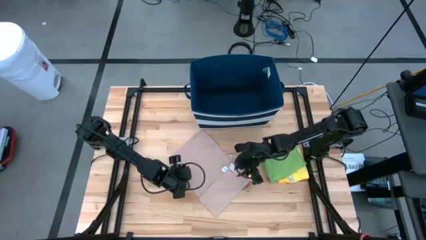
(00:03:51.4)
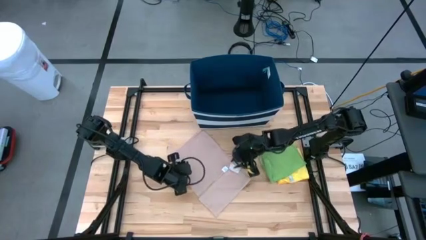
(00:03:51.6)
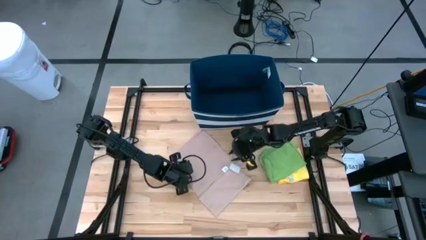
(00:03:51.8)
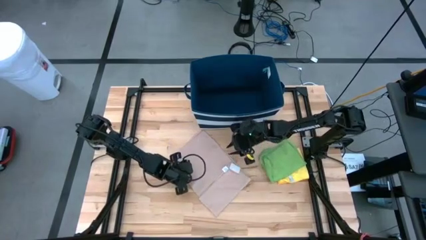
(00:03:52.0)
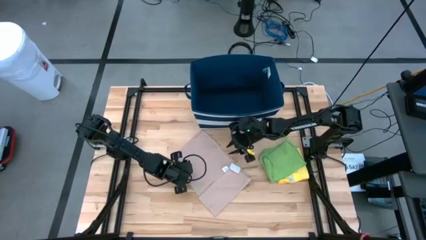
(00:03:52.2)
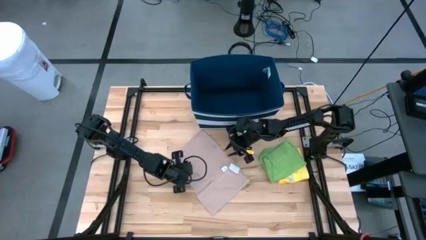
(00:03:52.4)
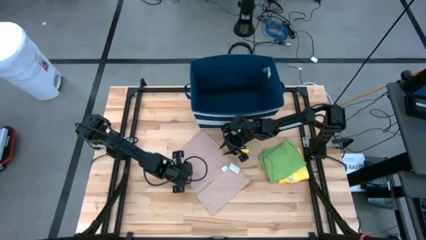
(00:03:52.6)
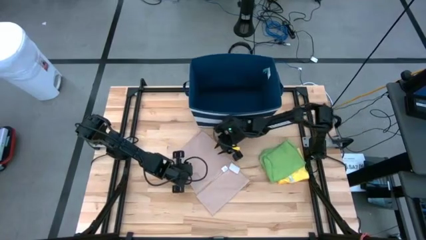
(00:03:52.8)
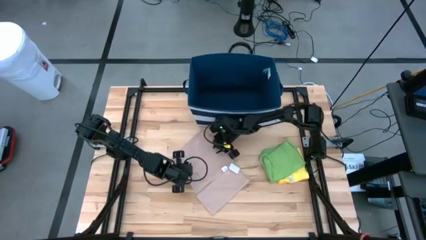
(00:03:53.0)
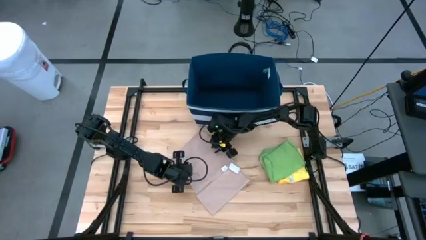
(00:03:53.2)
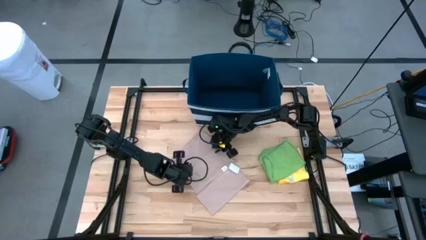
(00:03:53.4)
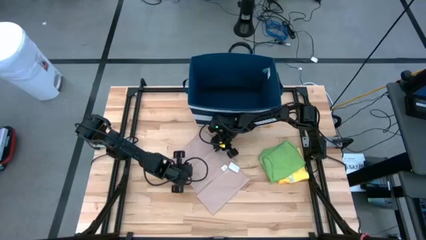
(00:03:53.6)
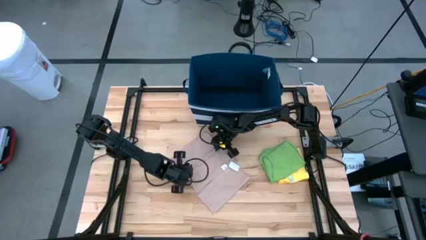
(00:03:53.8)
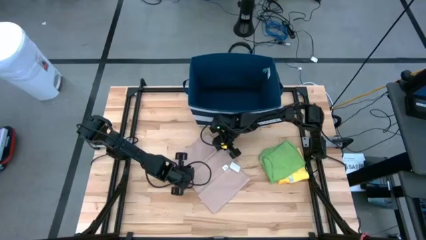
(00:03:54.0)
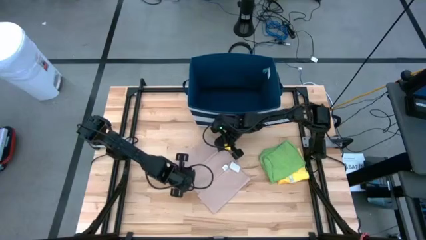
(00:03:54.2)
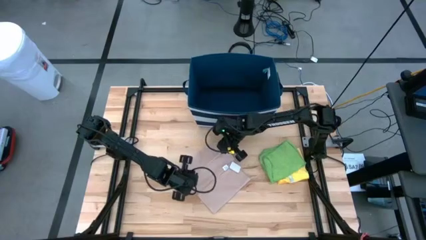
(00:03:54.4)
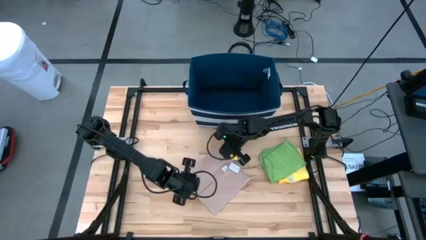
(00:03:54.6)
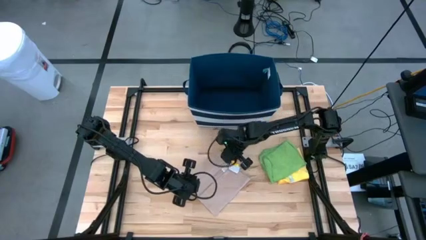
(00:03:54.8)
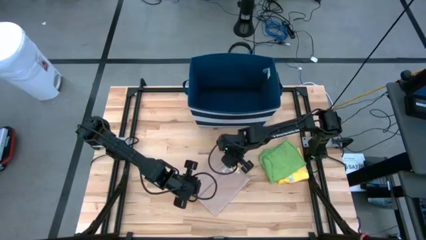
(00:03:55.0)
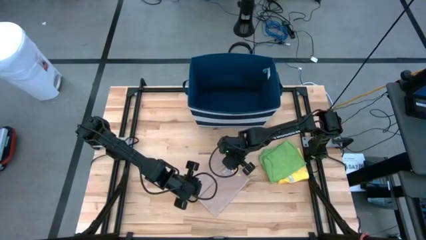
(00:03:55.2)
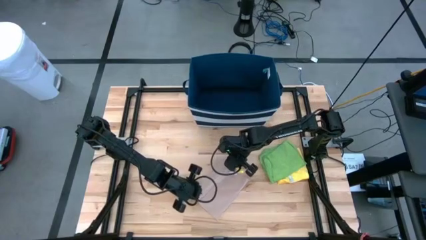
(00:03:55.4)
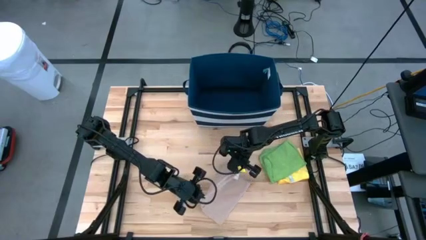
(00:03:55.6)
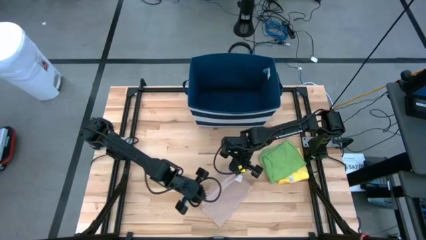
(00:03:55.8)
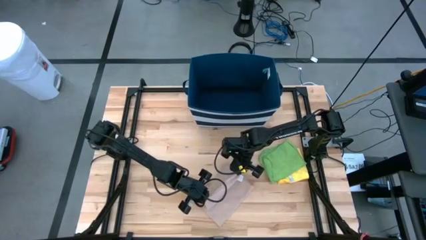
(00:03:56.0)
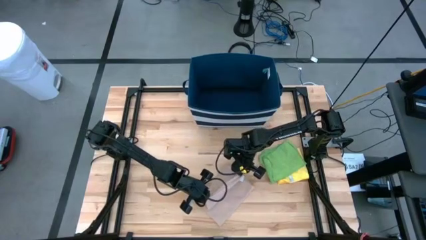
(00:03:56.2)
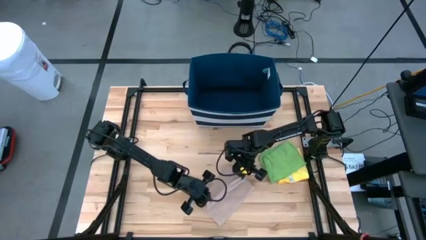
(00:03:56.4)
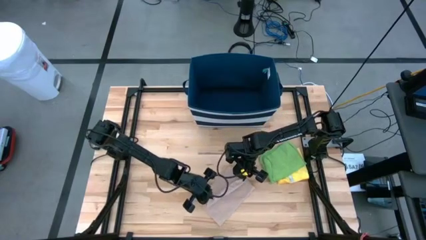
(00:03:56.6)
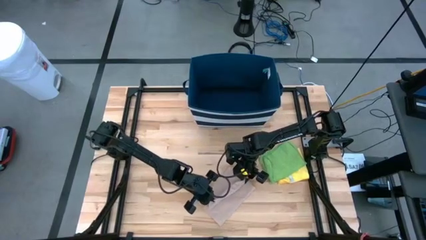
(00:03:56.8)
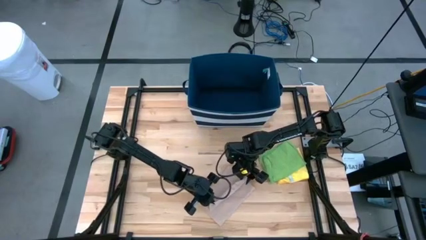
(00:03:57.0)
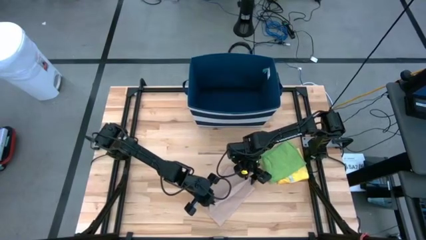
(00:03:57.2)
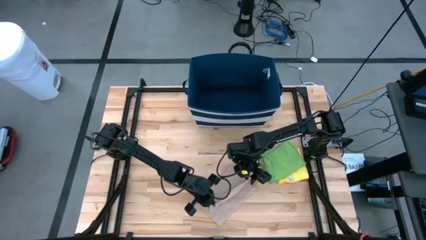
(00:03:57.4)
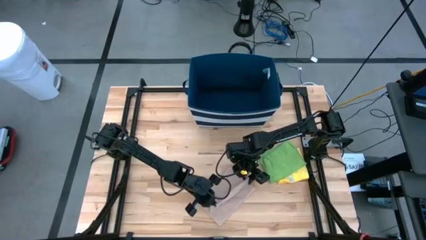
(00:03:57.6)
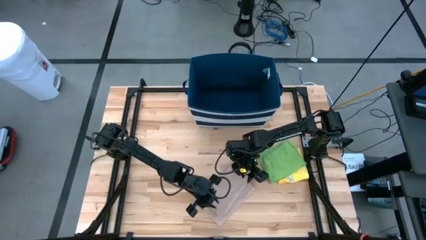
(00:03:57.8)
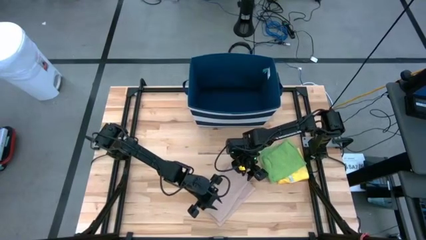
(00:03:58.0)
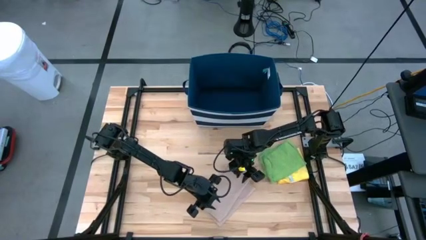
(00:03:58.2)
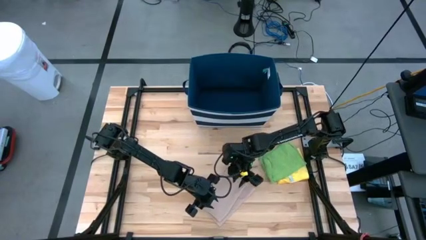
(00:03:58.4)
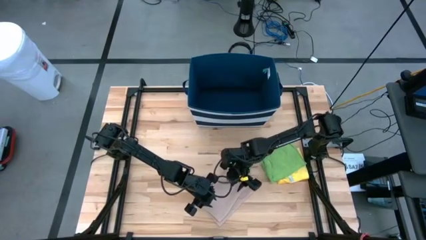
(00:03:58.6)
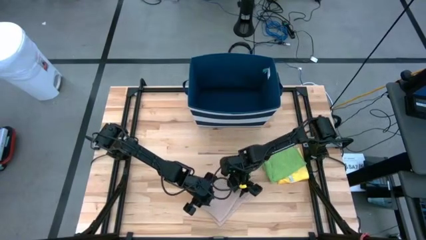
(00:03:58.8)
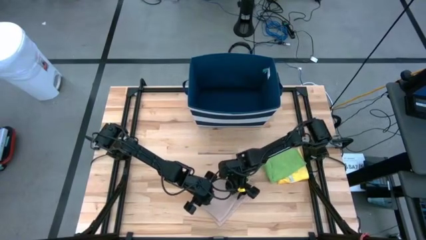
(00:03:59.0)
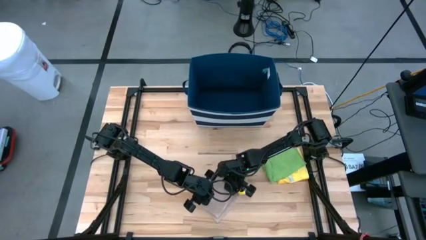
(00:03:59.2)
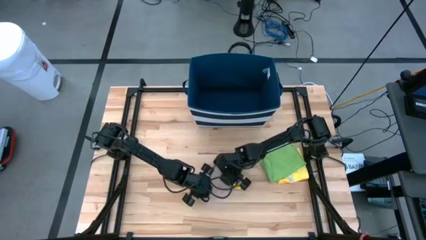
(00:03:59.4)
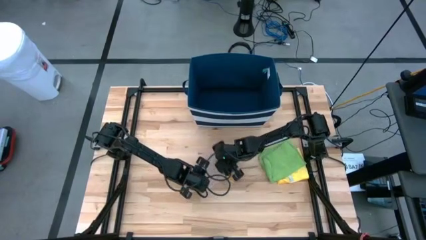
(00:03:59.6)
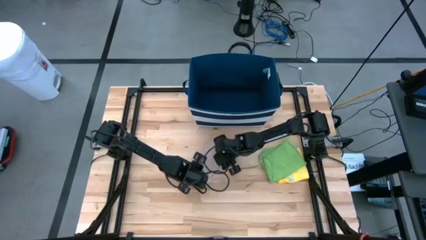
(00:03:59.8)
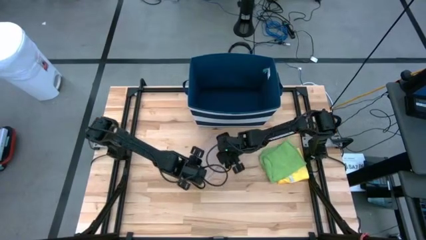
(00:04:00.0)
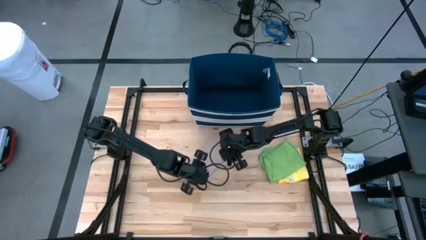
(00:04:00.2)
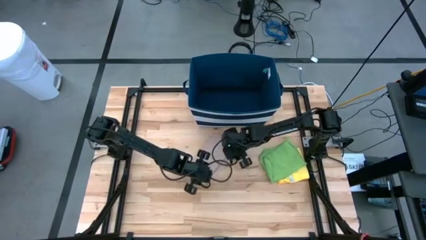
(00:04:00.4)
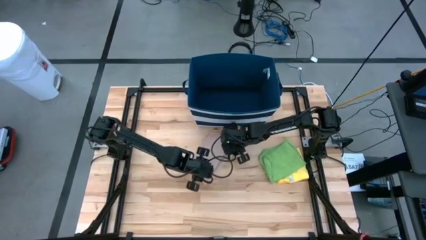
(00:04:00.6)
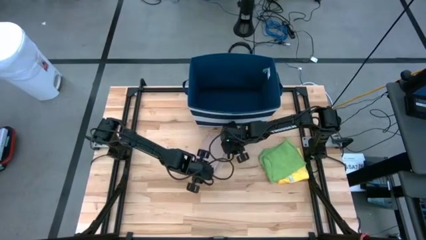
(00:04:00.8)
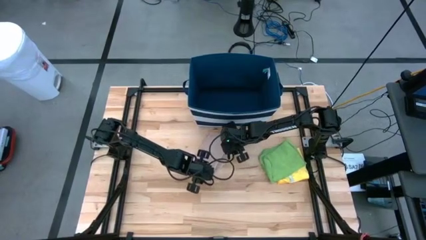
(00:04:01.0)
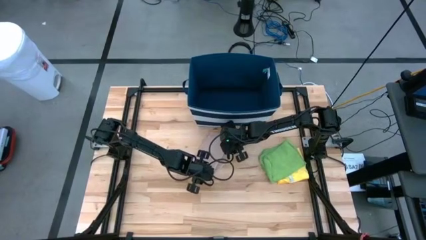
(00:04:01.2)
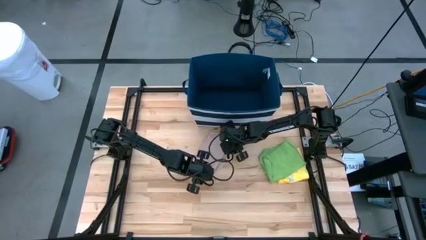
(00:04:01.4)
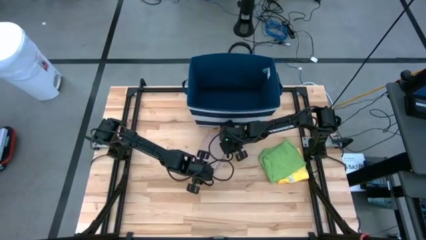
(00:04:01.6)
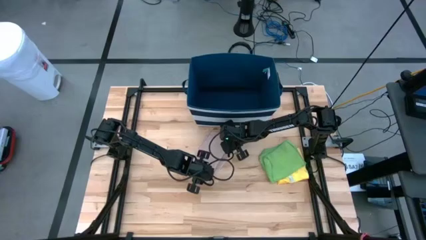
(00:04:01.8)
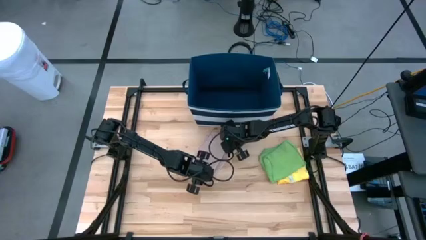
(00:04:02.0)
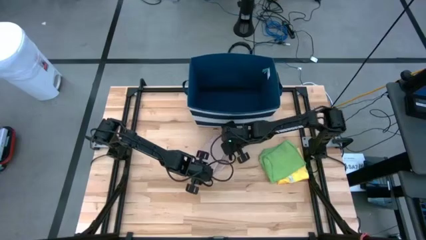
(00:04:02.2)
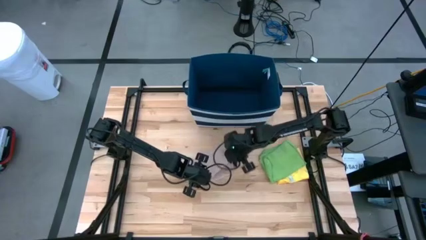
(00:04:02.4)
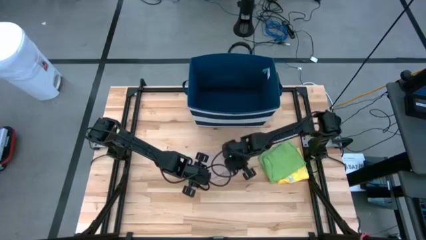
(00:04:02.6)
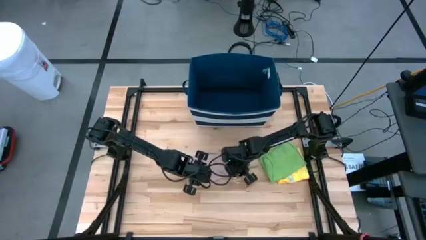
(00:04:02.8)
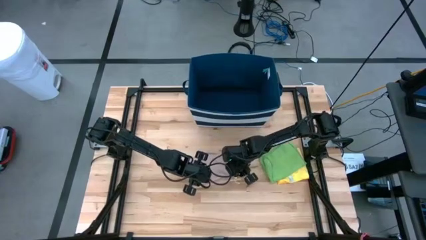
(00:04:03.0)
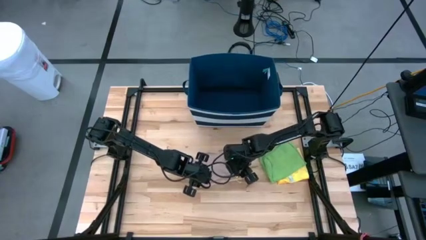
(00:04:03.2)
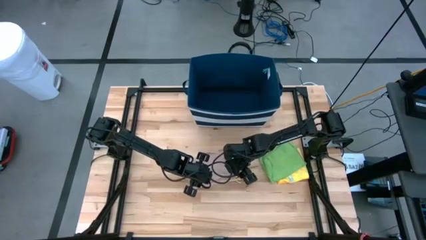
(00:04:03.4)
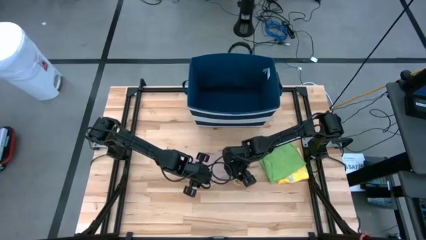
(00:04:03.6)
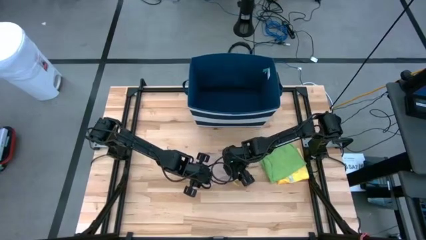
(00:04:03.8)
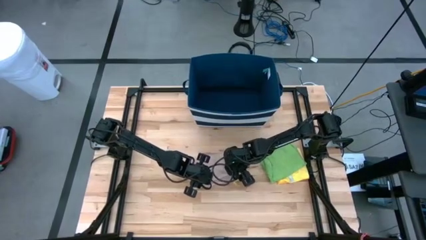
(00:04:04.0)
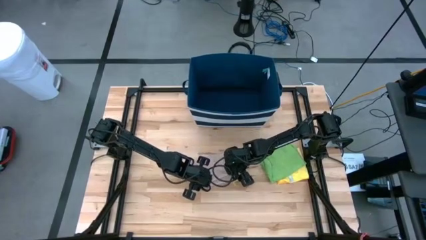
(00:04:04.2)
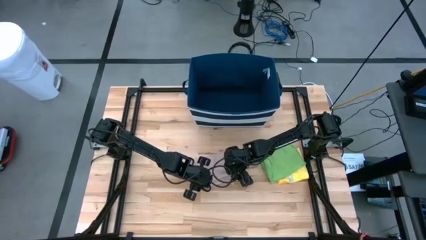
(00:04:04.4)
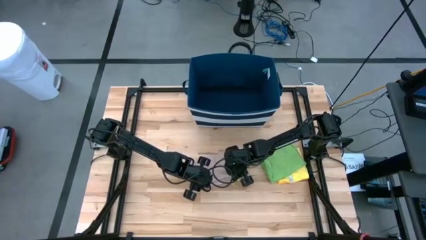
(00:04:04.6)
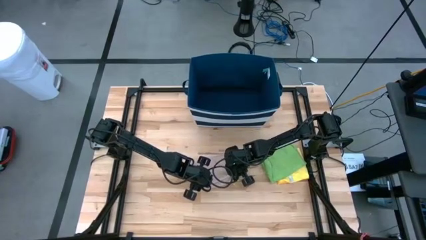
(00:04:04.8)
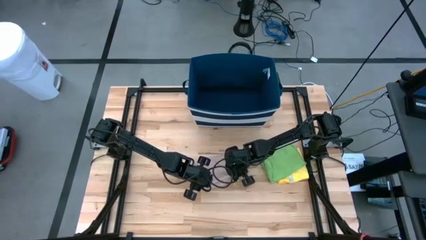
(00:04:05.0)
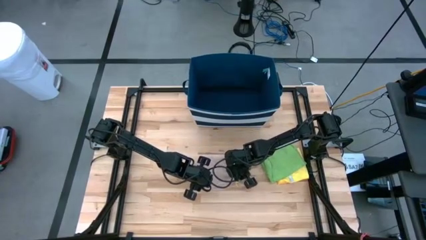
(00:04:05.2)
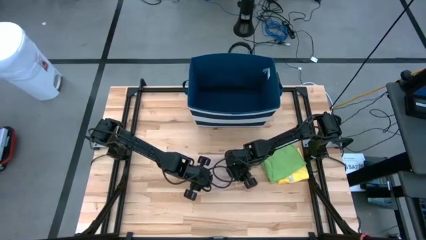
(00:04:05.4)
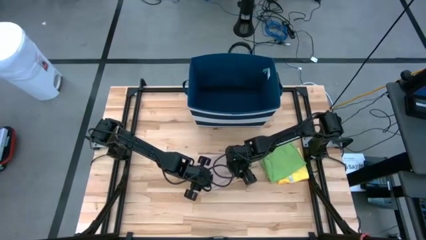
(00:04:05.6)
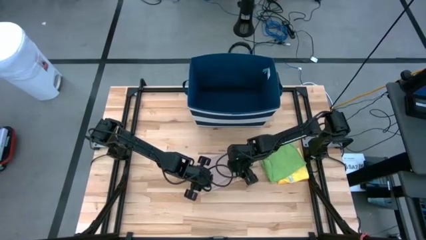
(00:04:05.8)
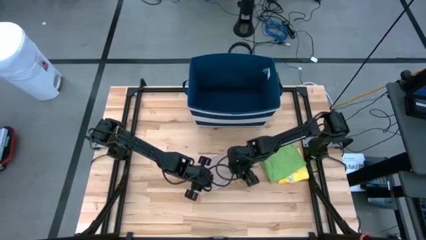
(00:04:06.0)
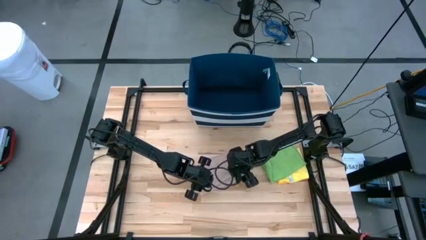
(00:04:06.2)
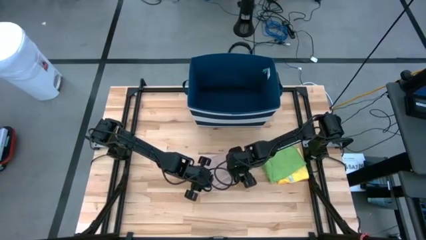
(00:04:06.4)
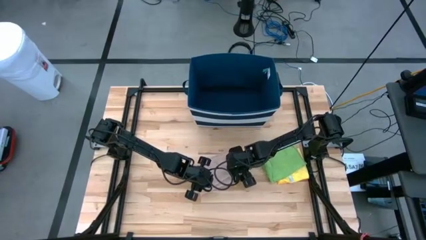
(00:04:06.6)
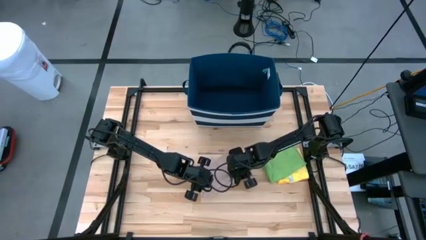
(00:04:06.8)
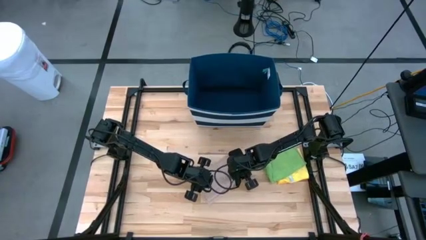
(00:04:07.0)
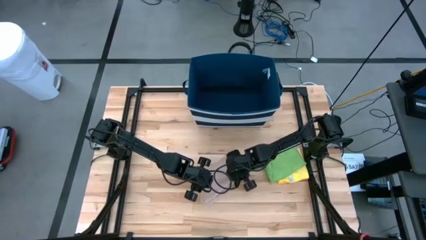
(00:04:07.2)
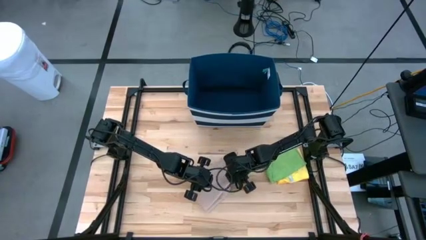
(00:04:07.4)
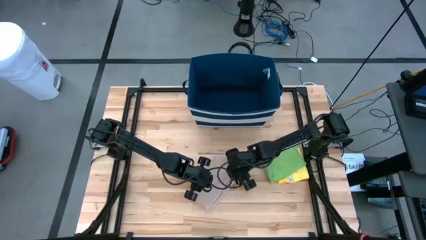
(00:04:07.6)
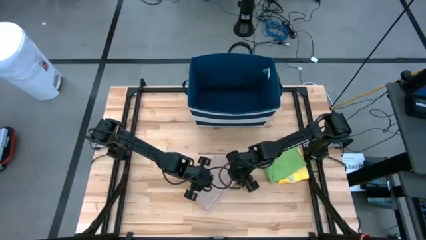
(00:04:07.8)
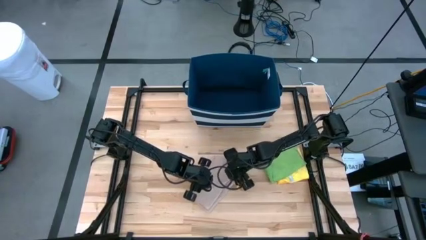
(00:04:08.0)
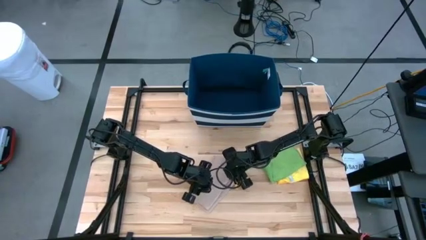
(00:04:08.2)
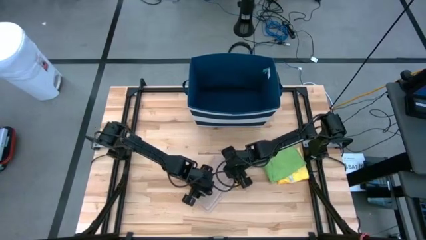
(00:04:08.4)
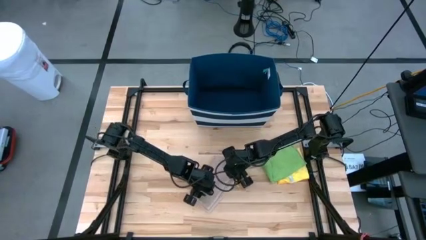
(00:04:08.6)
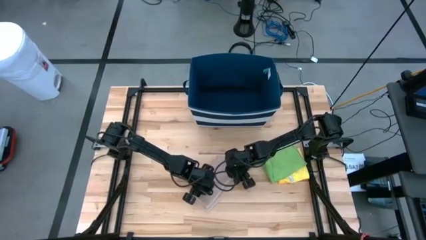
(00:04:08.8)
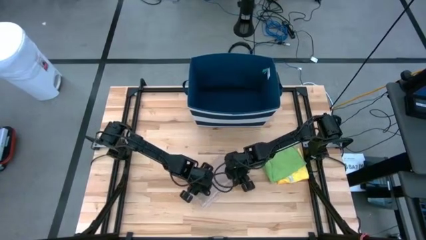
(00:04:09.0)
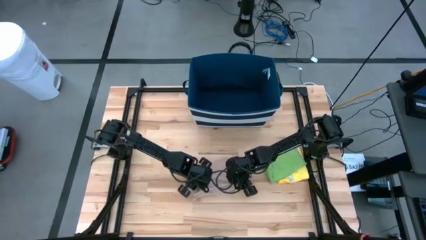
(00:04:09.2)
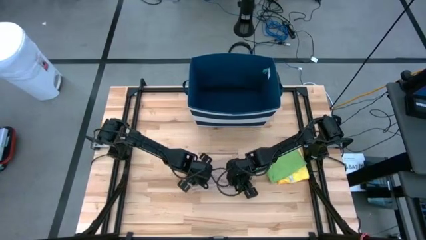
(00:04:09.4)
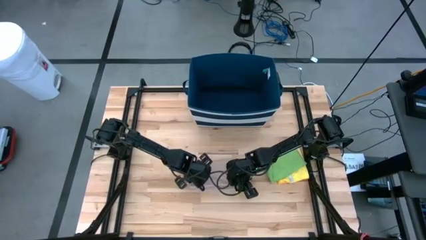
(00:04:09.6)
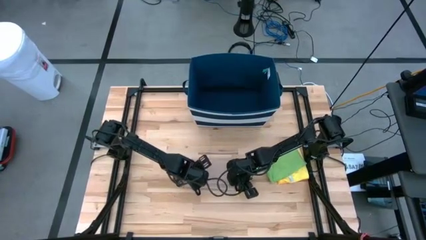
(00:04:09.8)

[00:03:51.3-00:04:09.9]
Task: Fold towel
Fold the light brown towel
